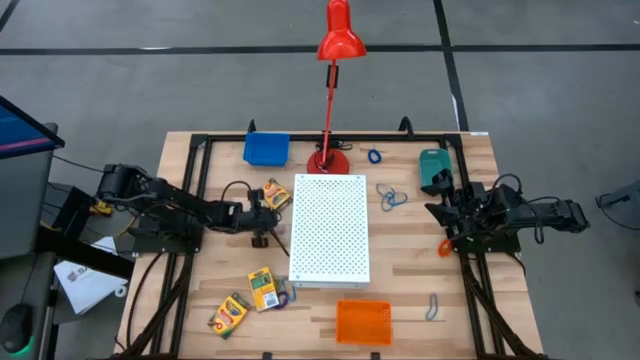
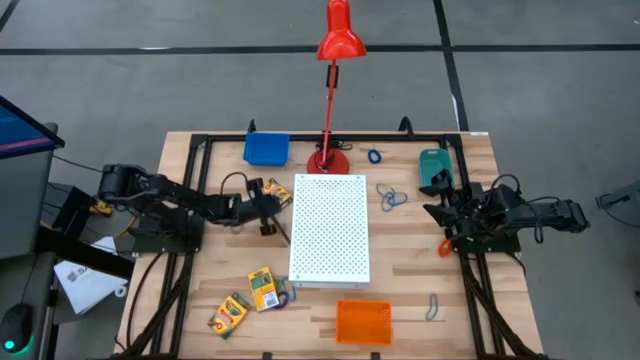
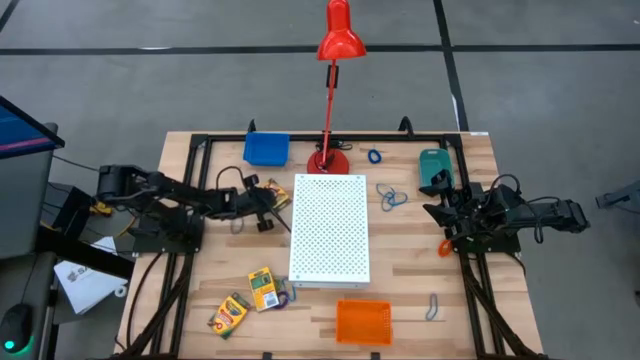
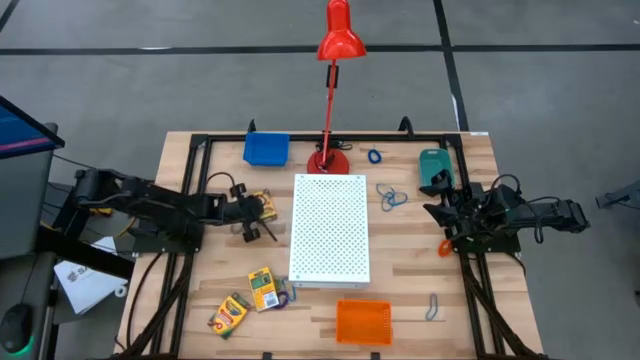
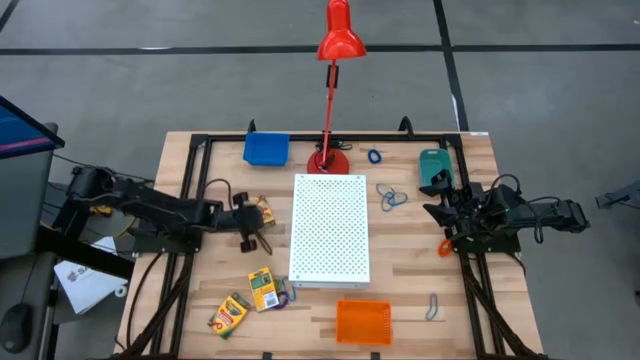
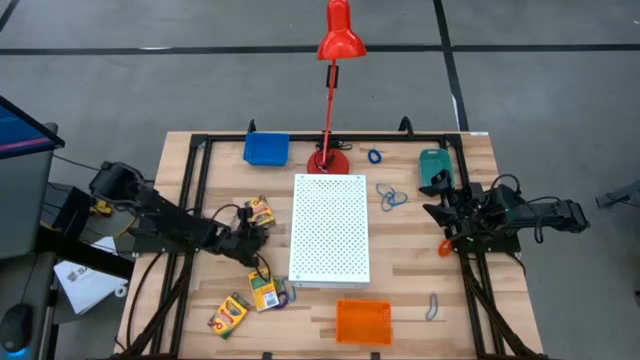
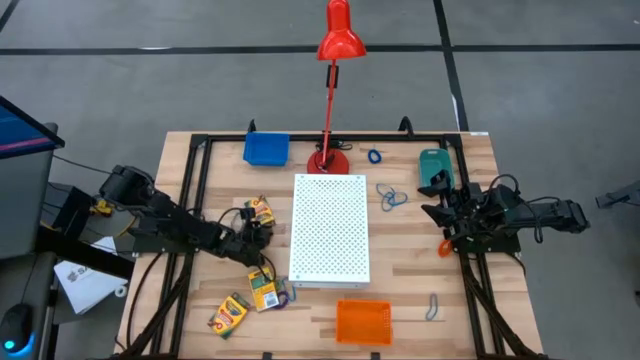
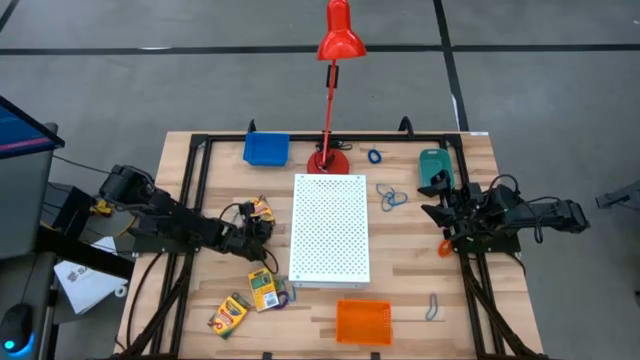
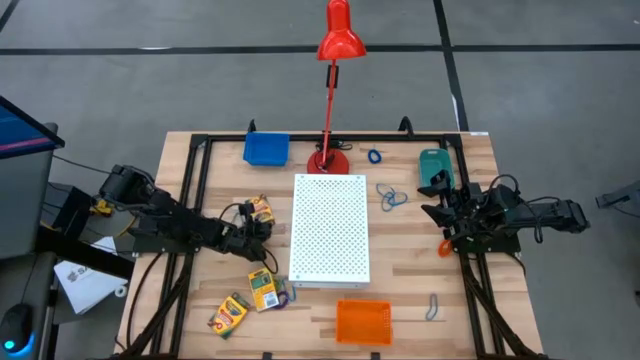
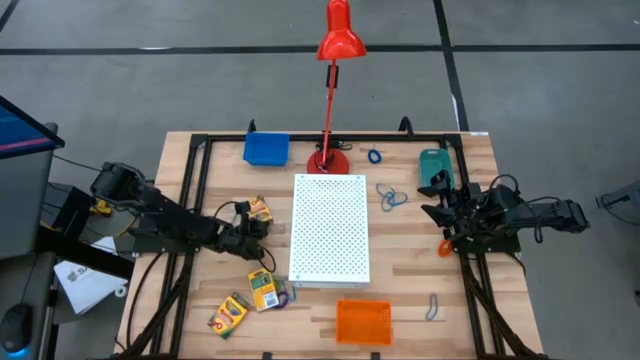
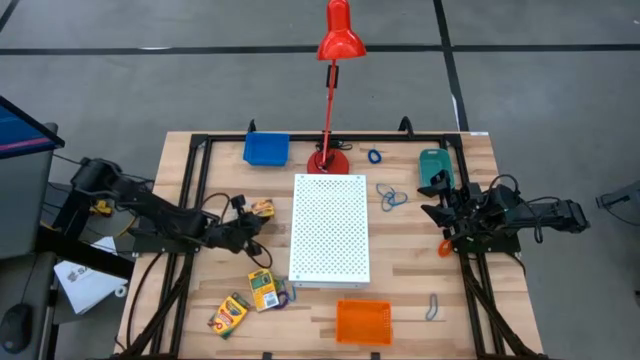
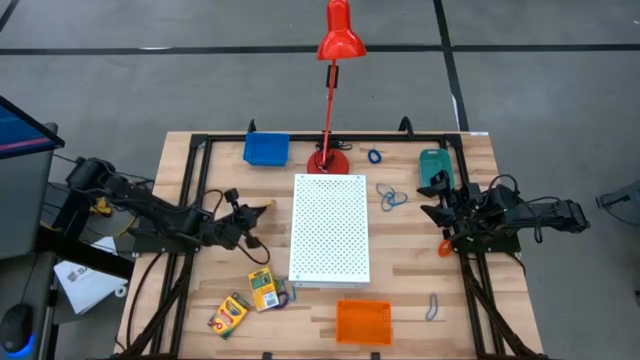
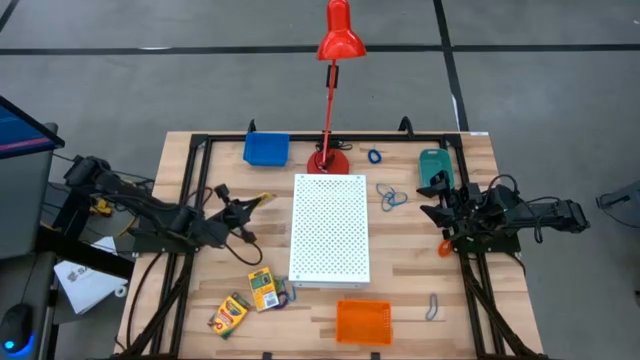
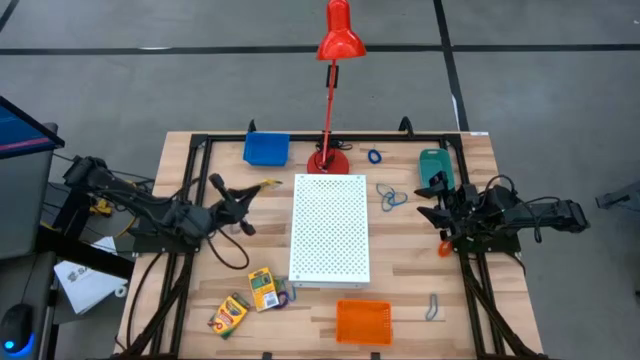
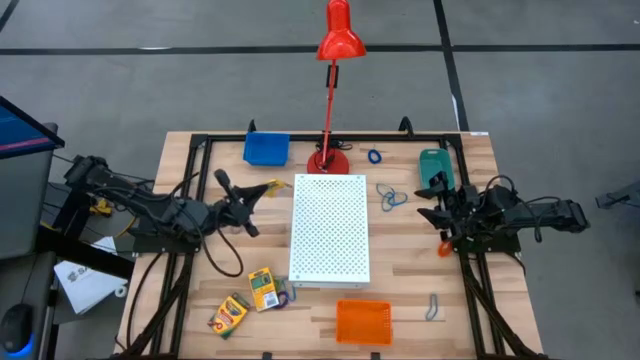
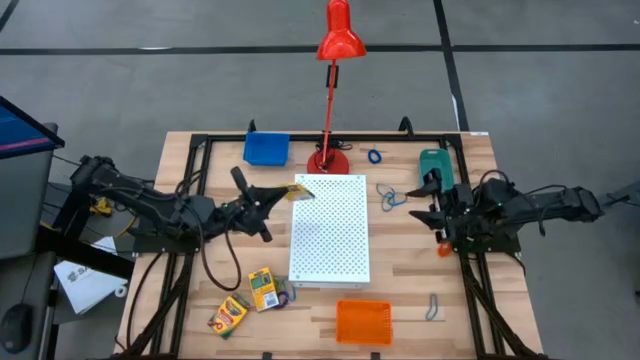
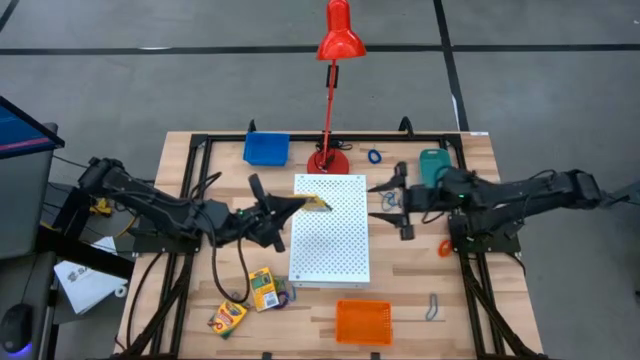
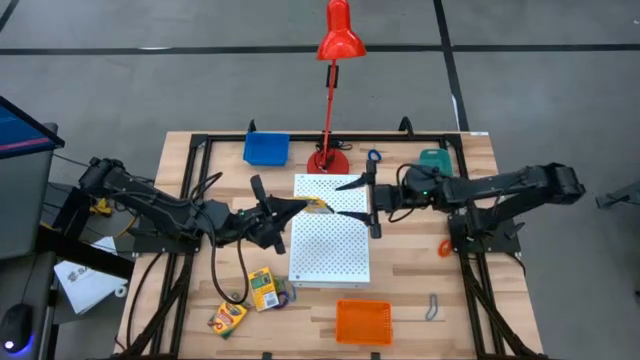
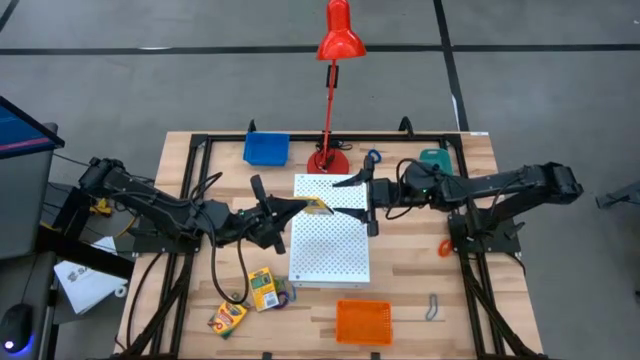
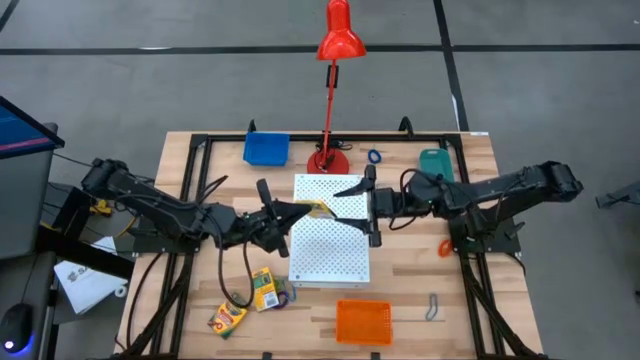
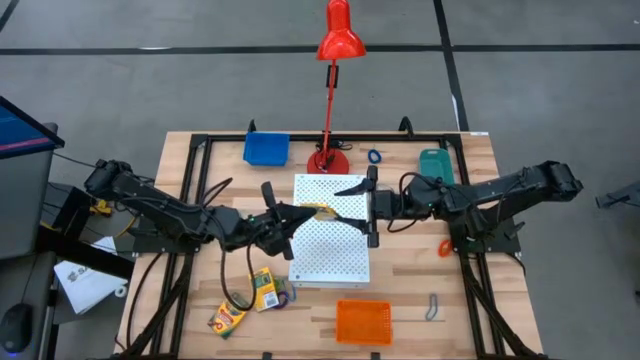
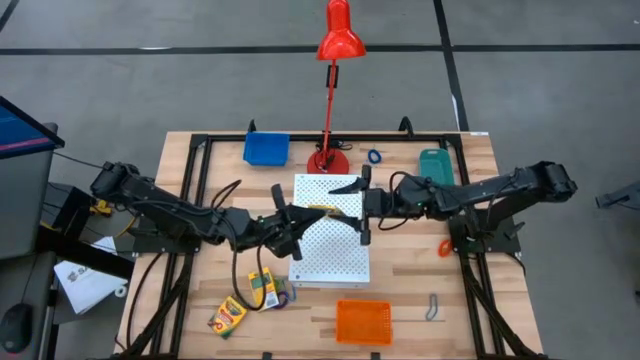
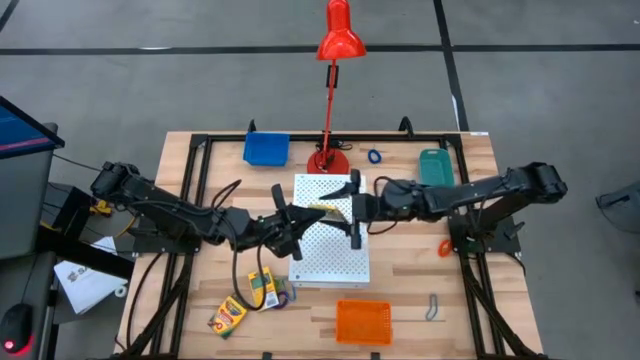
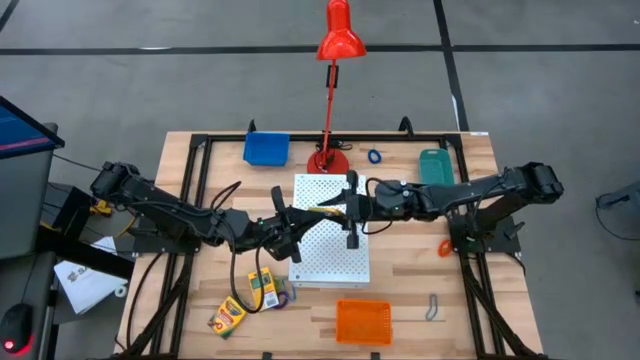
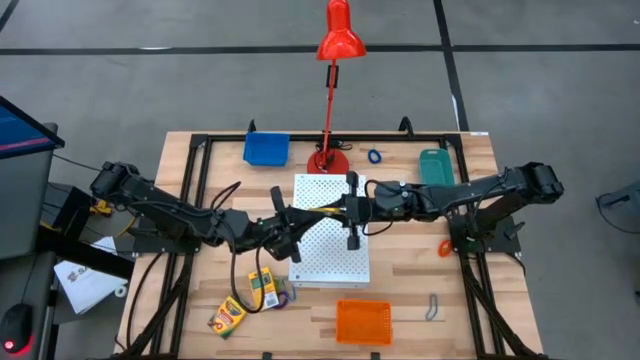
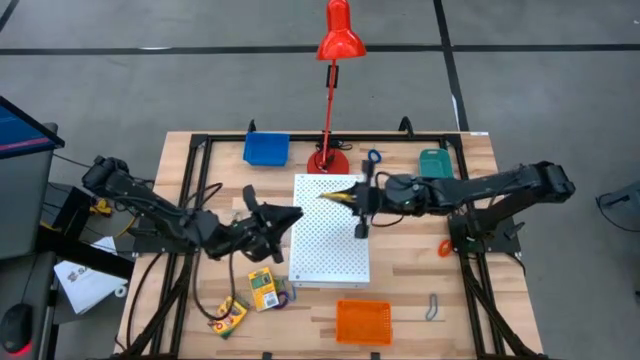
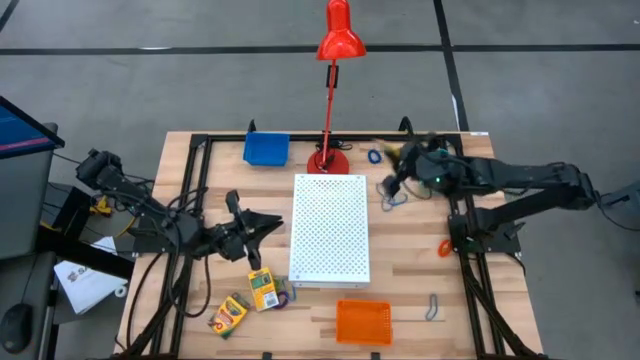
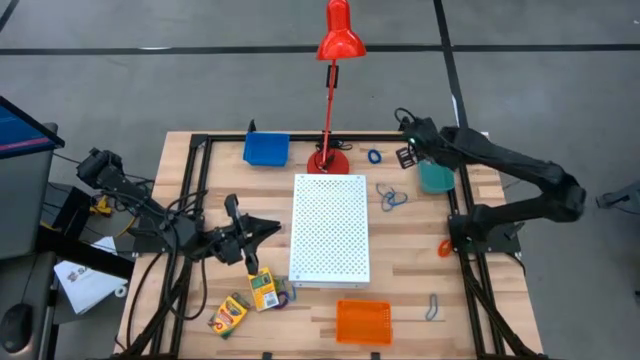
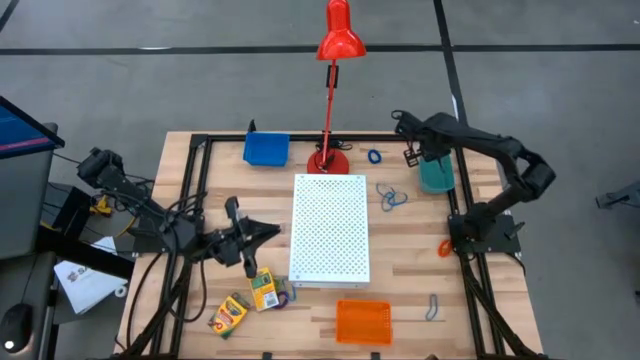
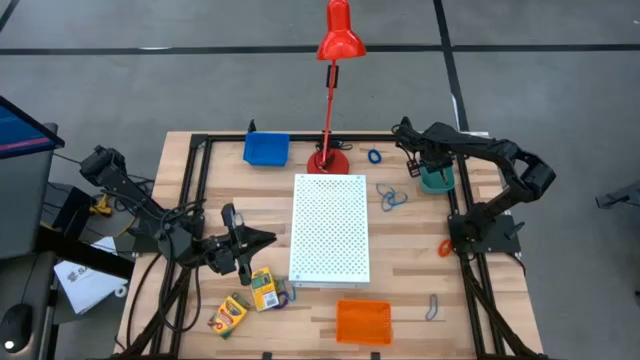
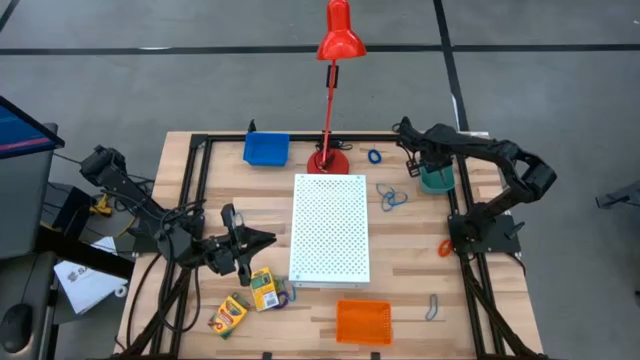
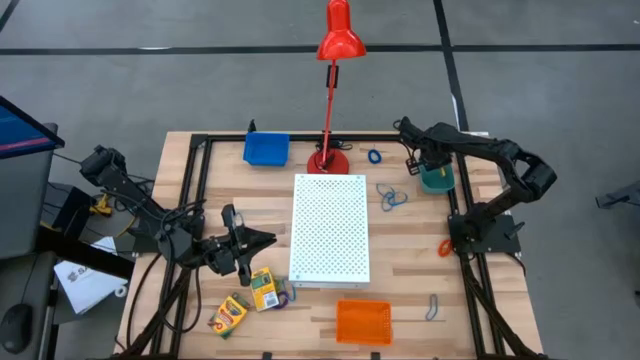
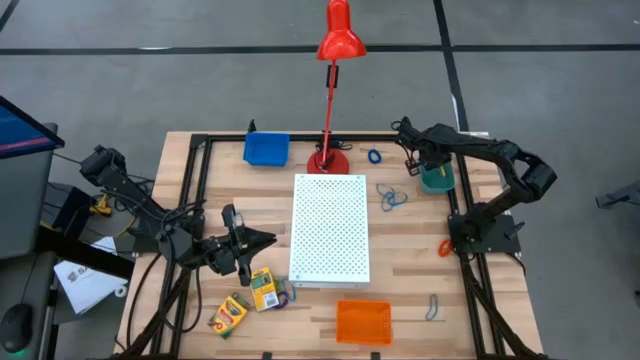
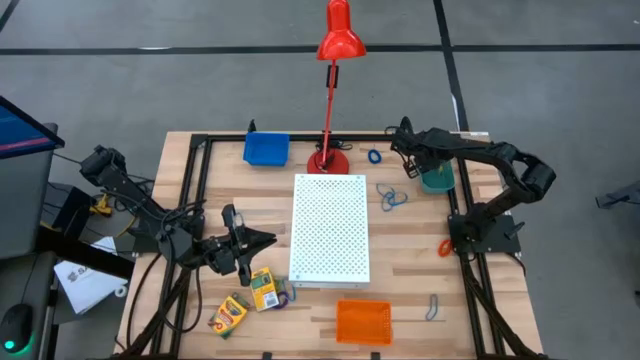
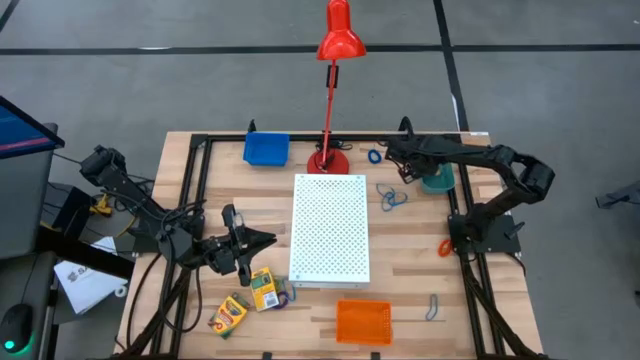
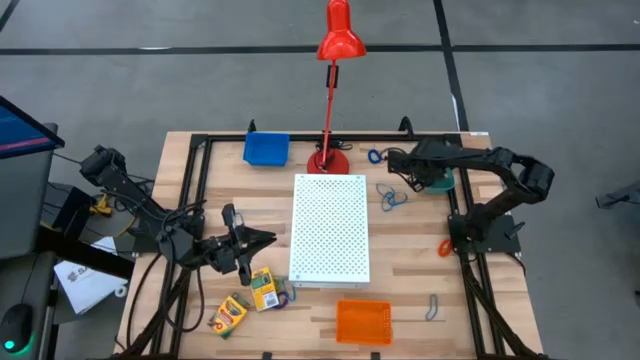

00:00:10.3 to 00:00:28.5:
Task: Pick & Place Office Desk Supplies
Put the yellow crayon box into the green bin

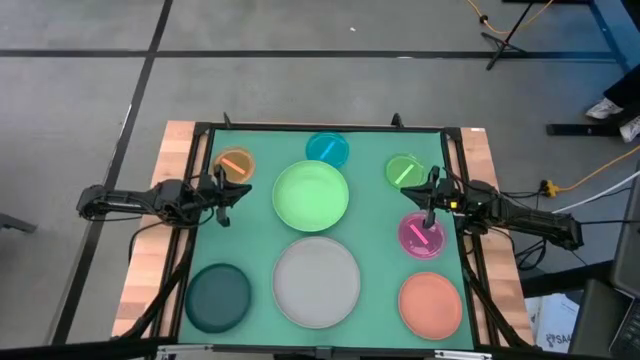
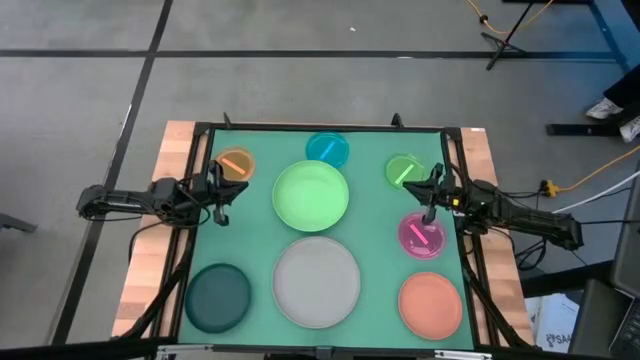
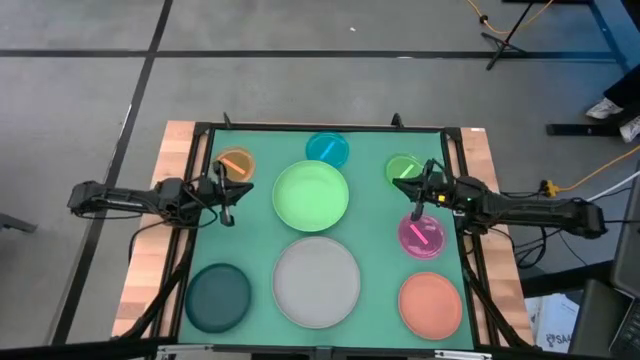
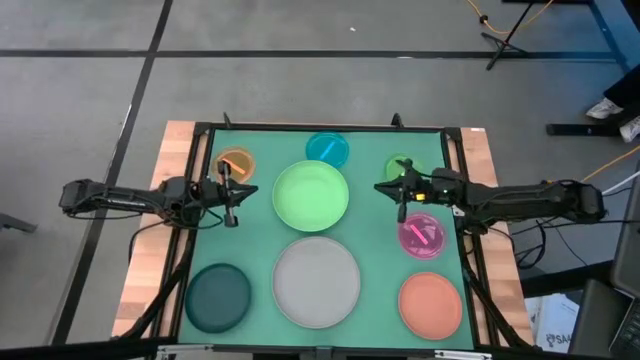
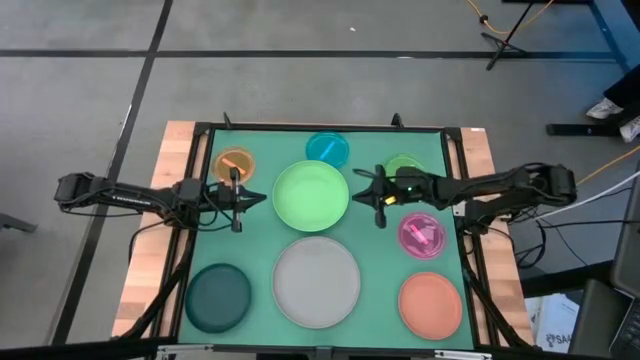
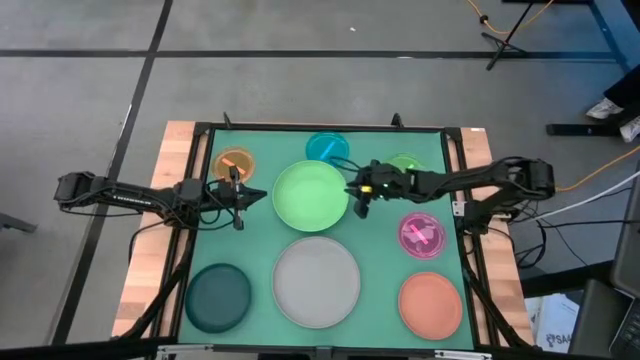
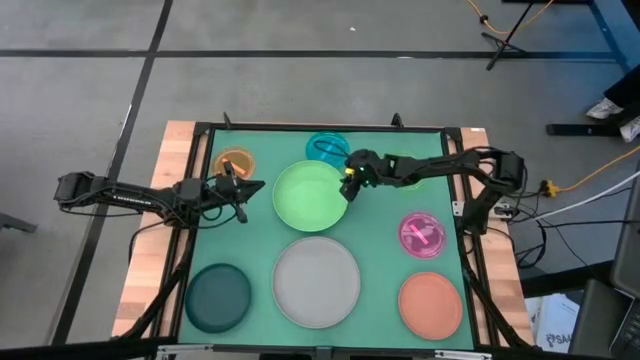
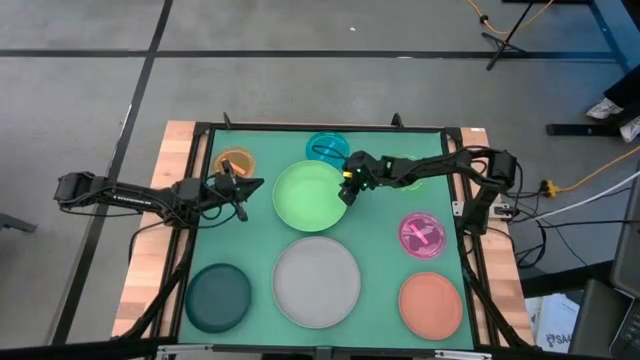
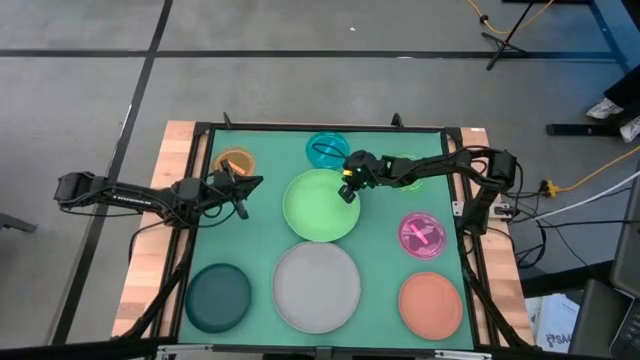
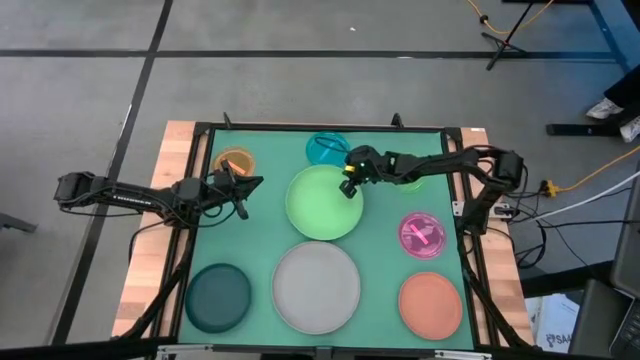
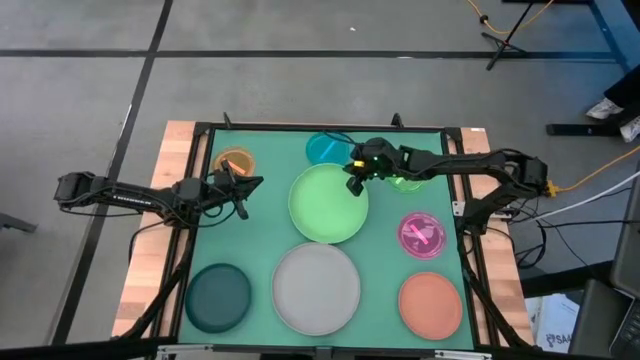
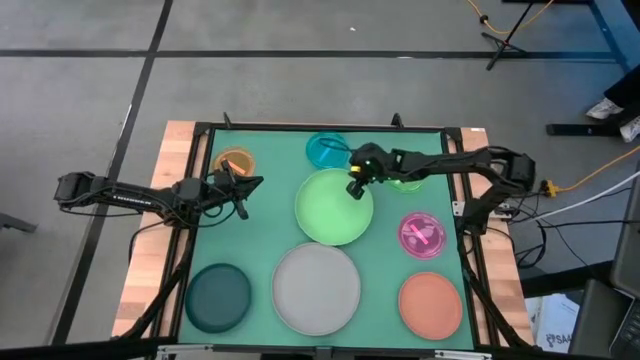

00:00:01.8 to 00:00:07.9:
Task: Stack plastic plates
Stack the green plate on the gray plate
